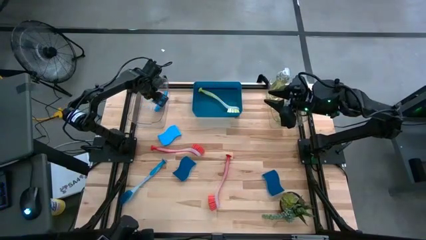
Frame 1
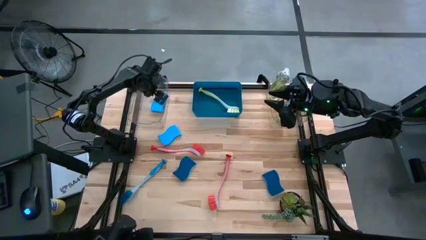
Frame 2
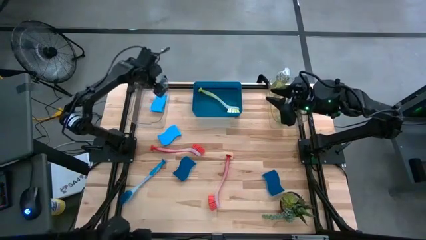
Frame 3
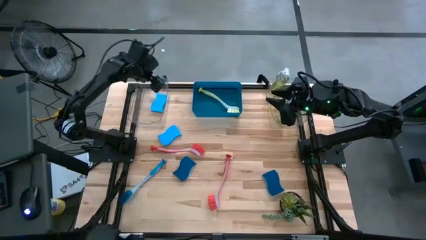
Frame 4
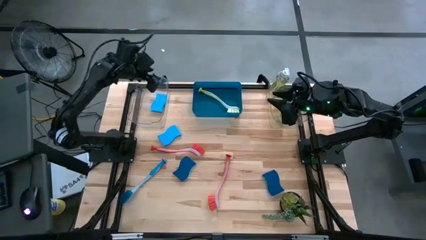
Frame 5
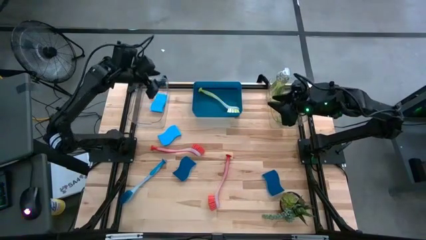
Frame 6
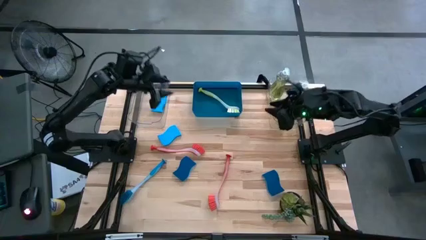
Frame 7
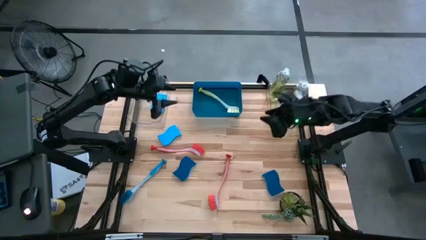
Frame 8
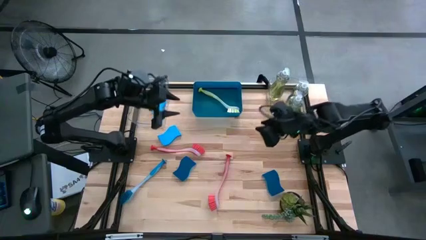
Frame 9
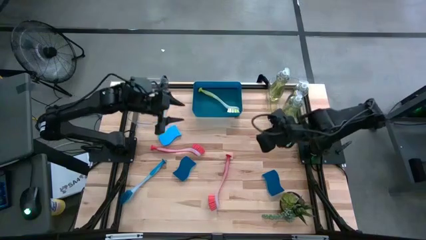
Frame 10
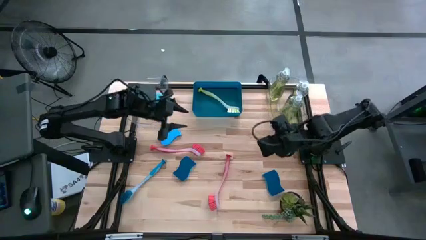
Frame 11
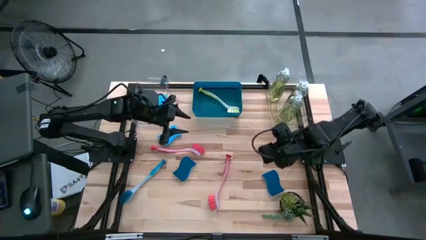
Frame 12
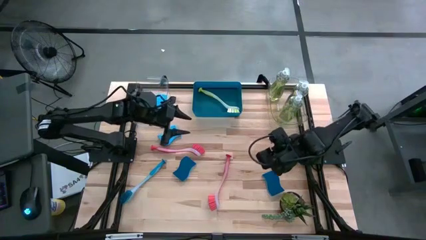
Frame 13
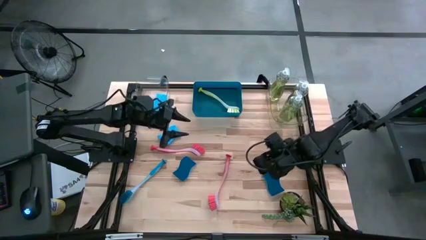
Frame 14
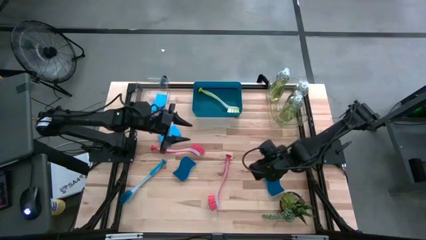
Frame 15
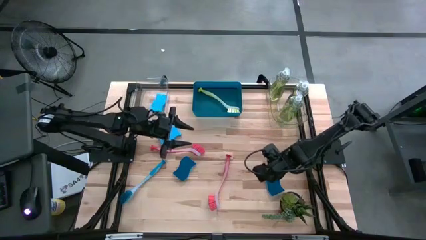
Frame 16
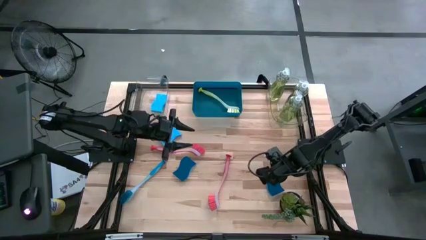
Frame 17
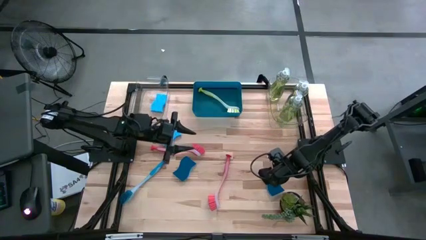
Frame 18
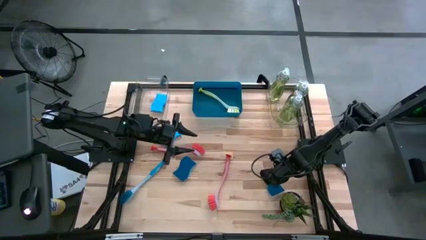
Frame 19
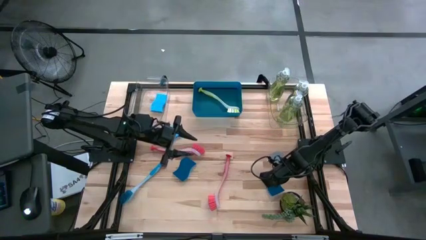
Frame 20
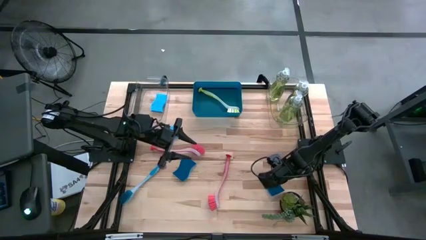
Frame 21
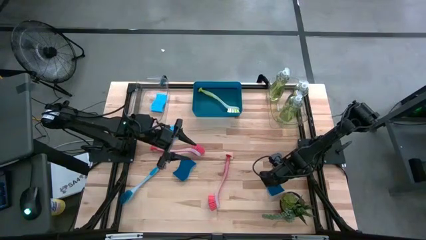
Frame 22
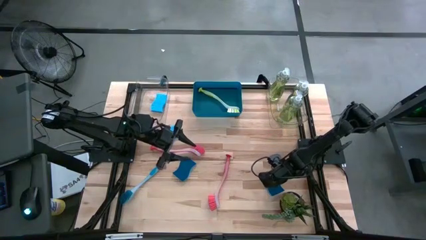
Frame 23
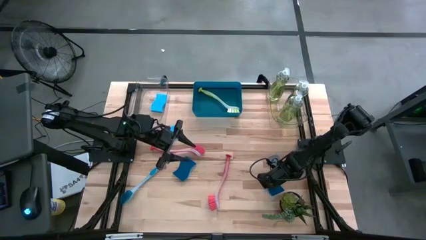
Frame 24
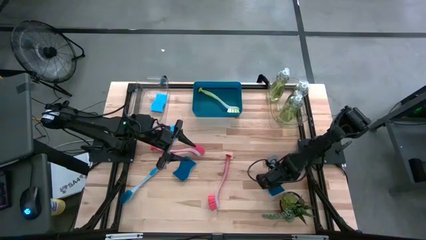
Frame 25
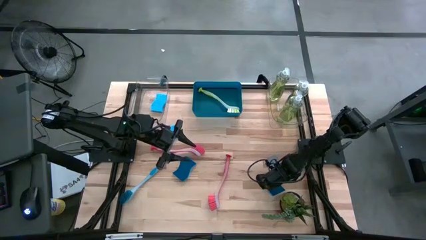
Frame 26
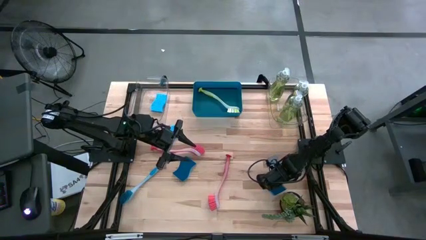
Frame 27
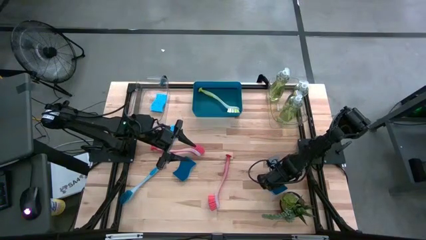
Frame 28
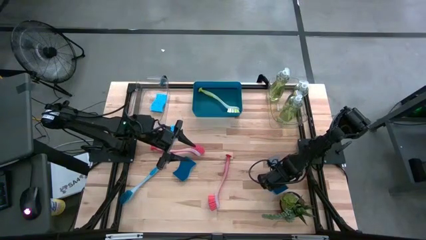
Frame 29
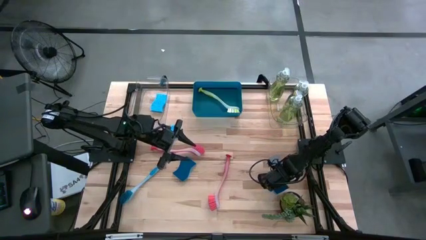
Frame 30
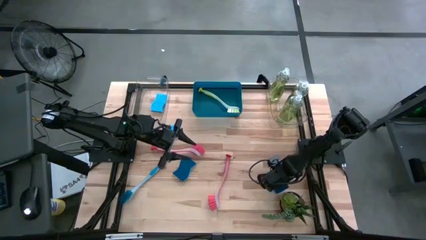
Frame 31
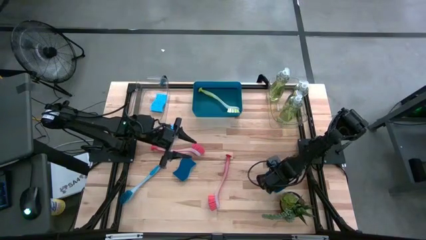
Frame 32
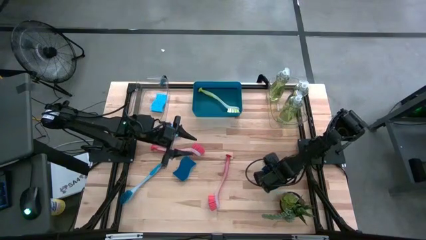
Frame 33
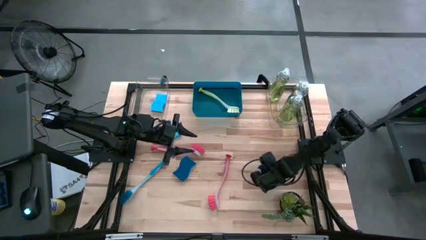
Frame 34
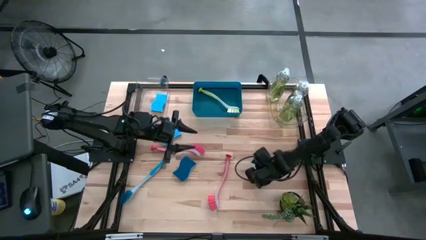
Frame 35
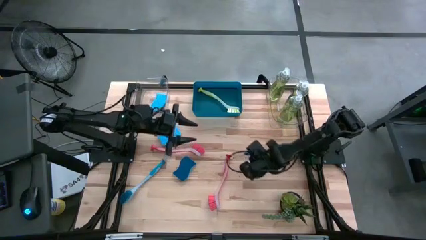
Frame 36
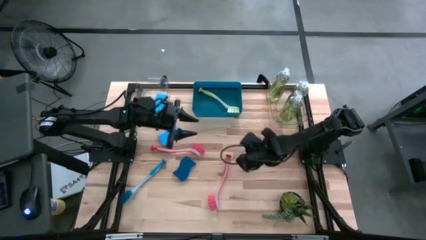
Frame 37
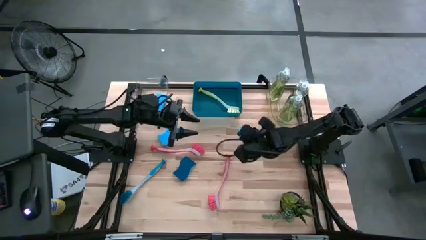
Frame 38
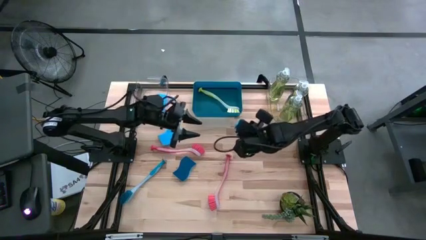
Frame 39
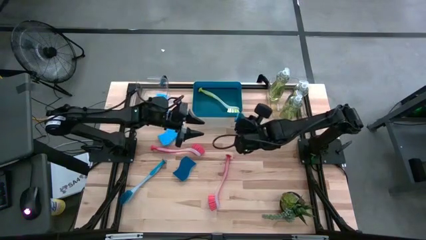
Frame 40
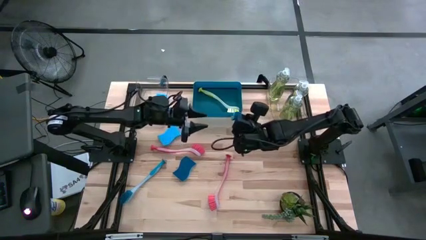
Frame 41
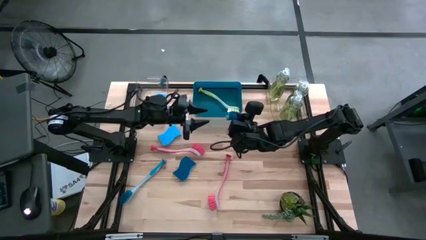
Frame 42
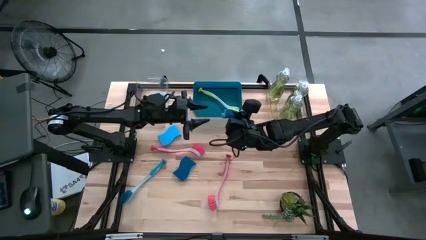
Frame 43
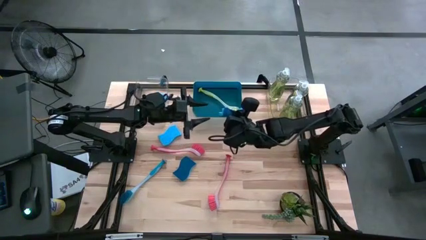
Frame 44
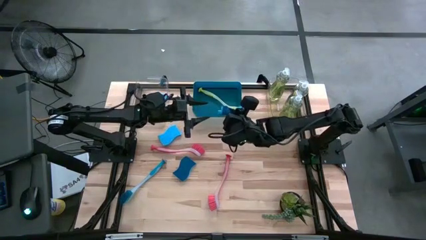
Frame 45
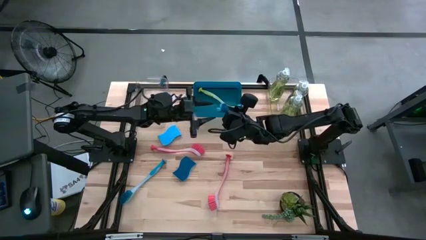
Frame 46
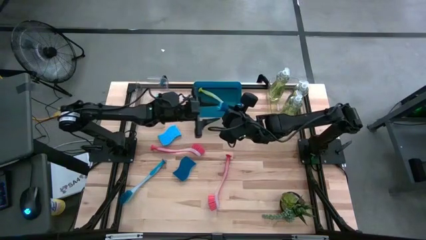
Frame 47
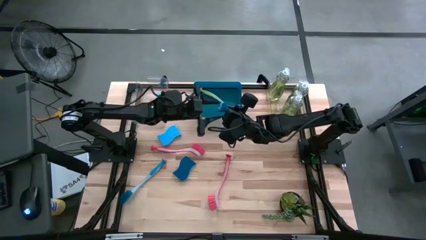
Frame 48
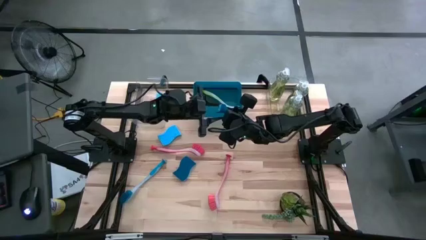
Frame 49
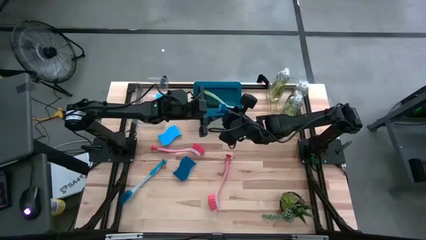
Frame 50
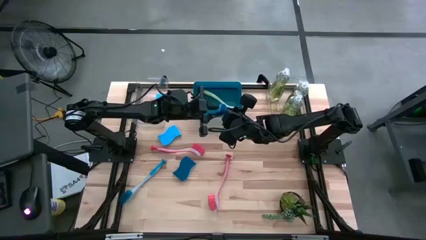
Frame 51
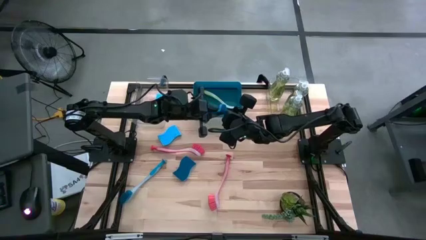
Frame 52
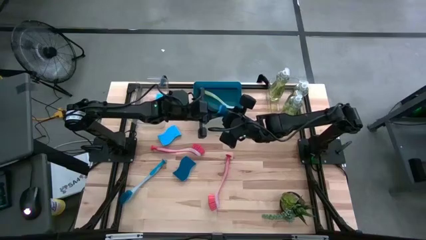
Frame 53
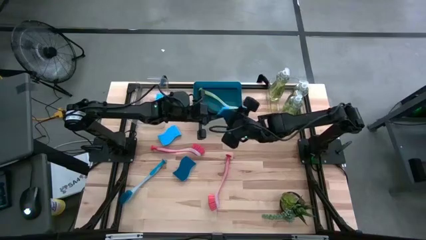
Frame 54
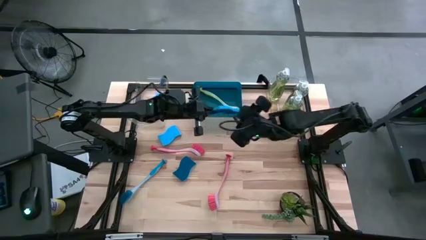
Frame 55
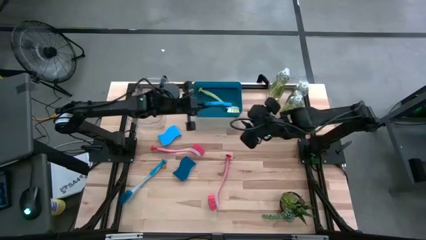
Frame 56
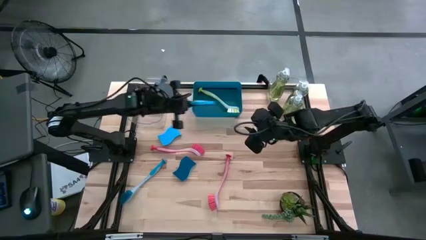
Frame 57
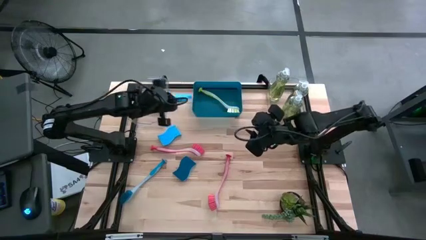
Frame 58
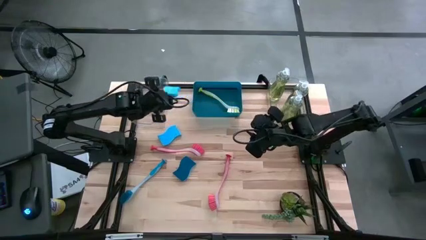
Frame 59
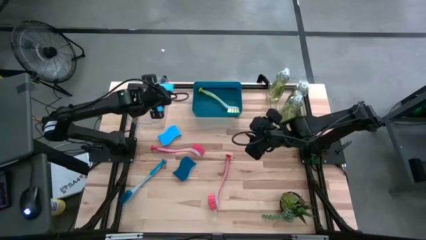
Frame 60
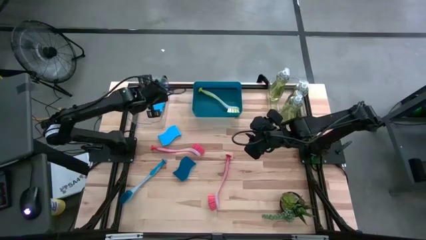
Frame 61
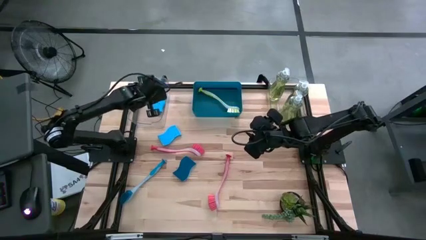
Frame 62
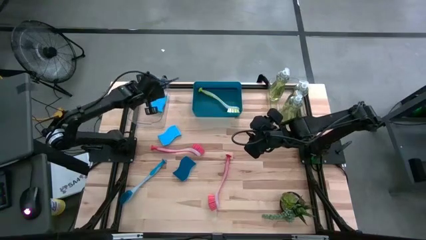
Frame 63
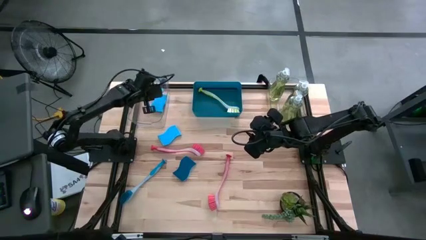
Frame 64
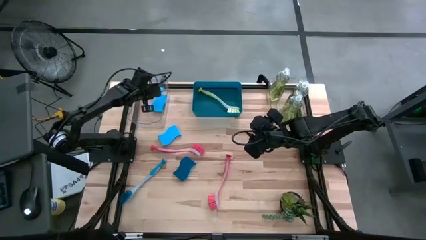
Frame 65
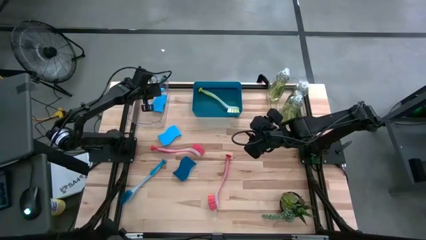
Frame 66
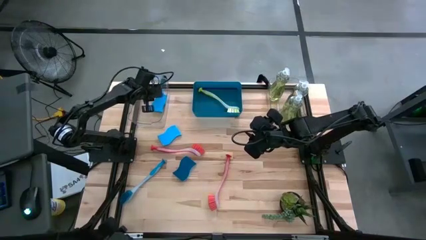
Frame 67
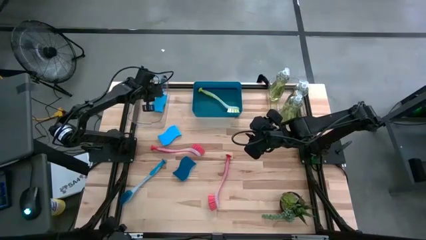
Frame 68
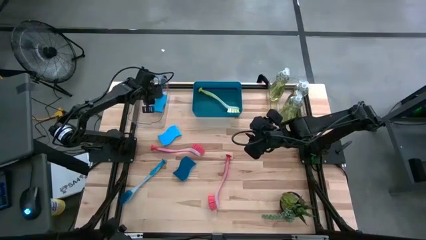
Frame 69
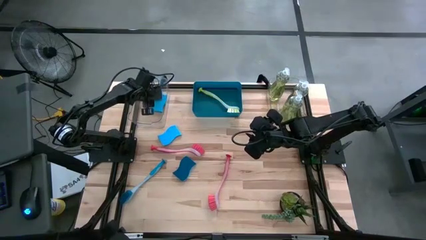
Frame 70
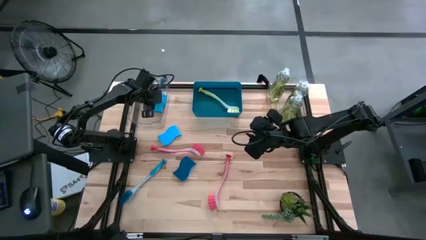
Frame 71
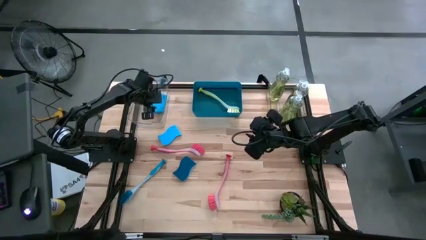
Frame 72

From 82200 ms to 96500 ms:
Task: Pick & Place Kitchen Sink Supplies
Put the bottom right blue sponge into the left transparent bin

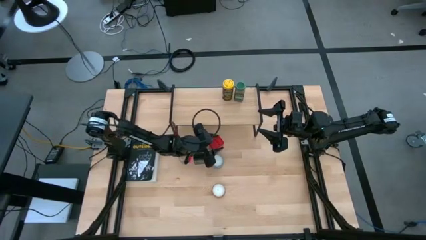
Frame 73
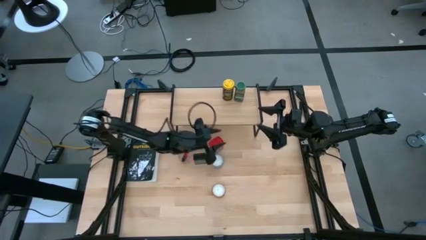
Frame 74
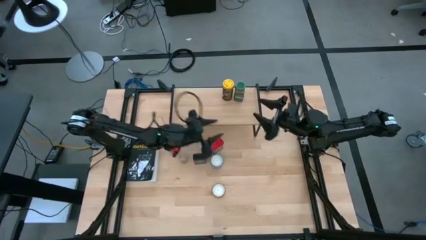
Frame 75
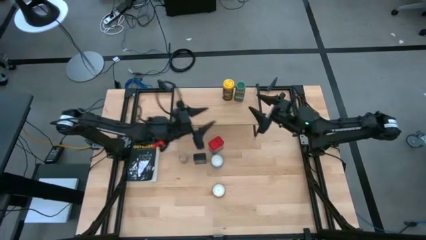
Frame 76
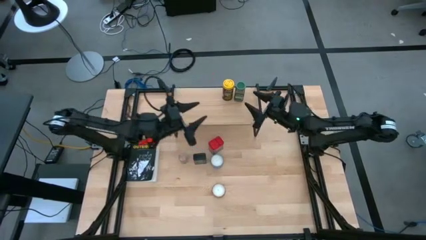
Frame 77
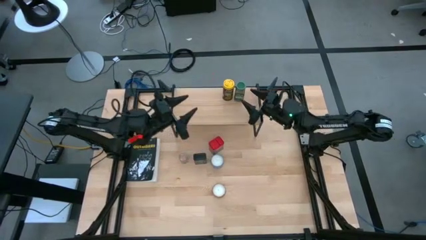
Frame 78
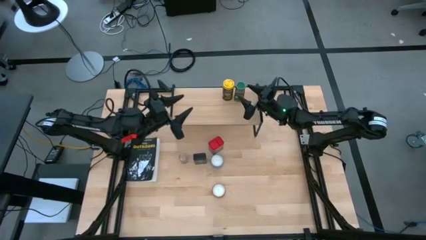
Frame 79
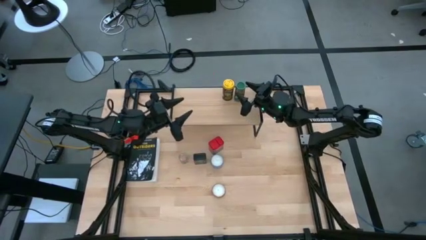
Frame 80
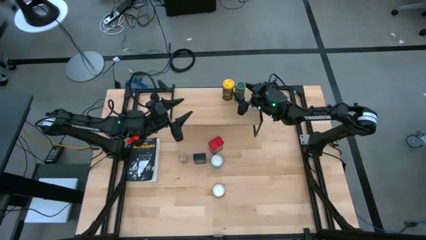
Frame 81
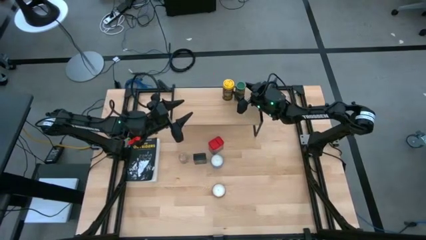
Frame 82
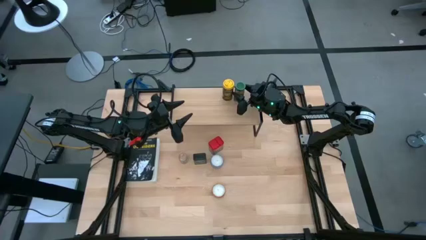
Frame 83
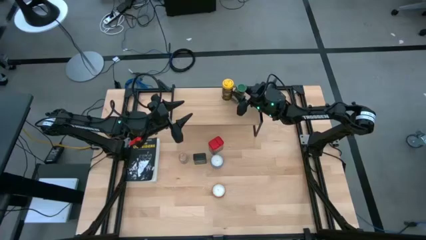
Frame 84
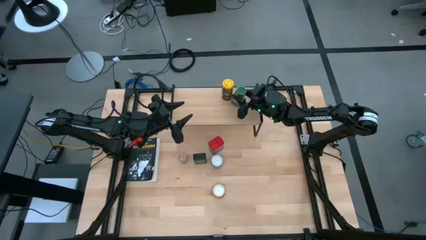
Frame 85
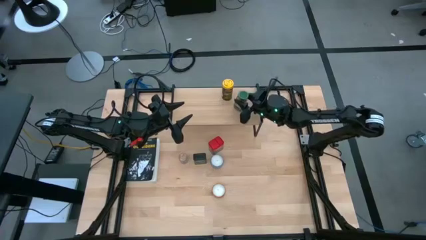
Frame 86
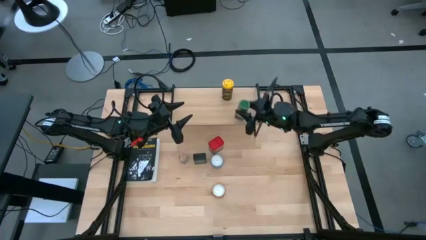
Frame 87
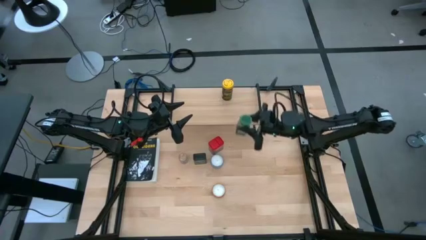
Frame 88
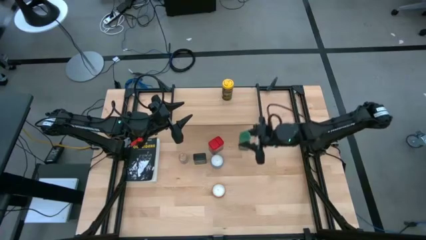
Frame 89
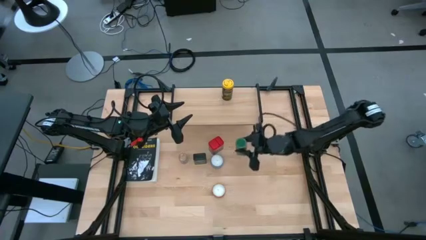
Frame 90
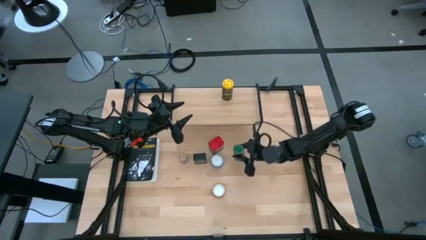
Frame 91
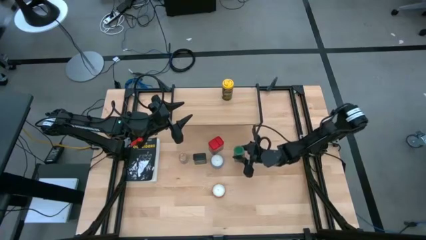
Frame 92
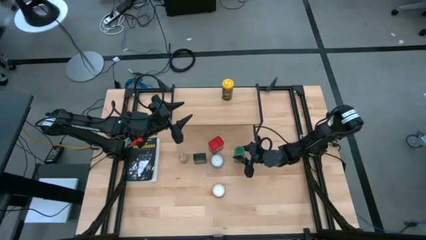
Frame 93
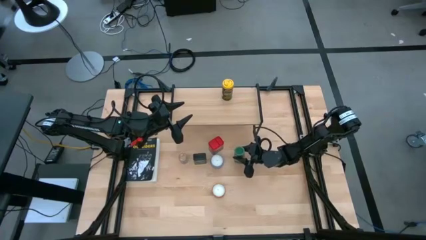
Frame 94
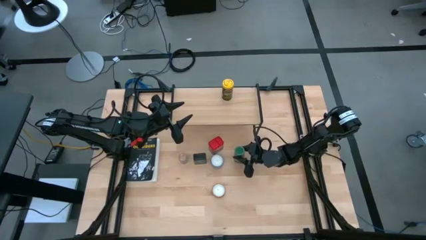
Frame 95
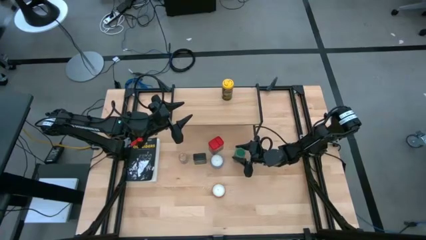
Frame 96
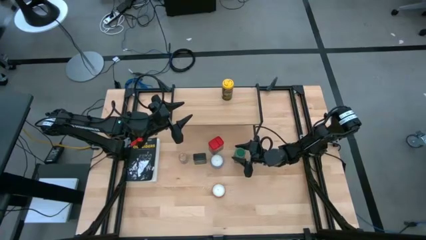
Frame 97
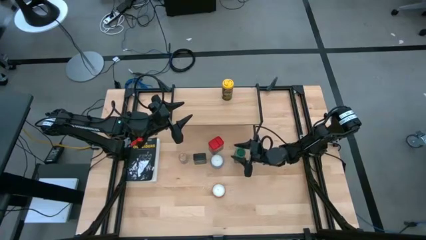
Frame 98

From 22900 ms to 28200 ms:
Task: Shelf spices
Remove the green seasoning bottle from the shelf
